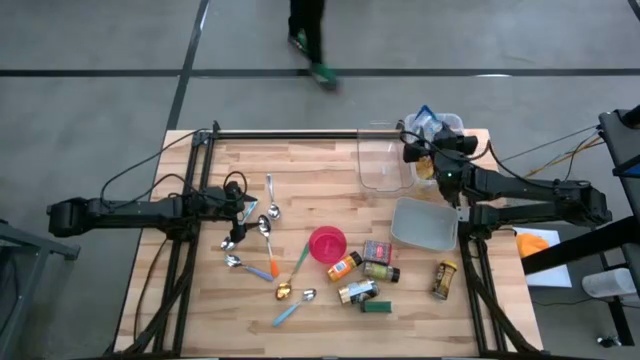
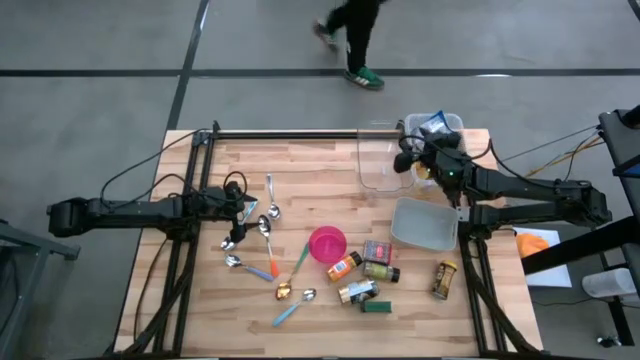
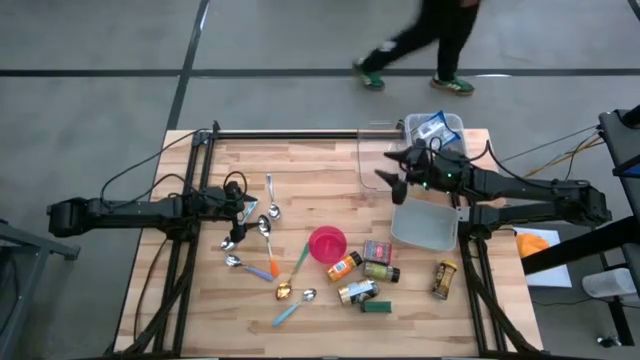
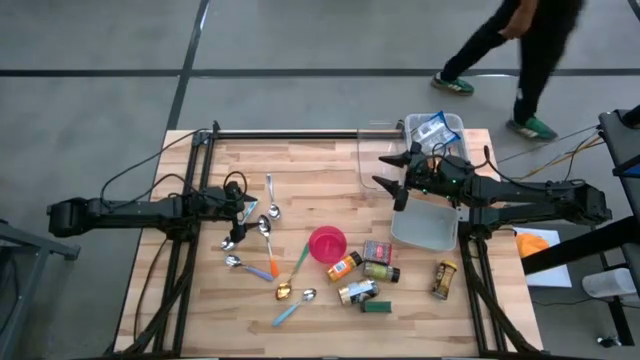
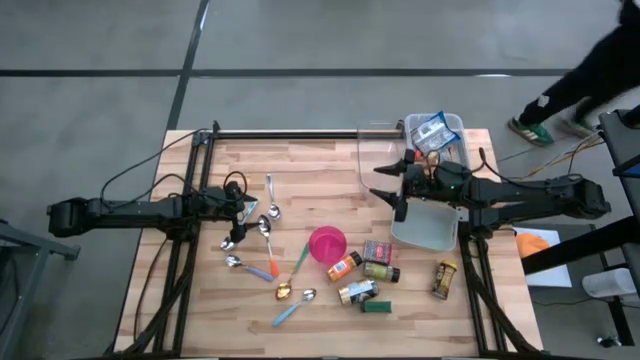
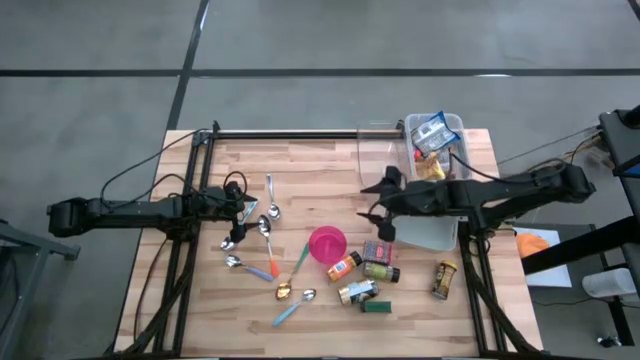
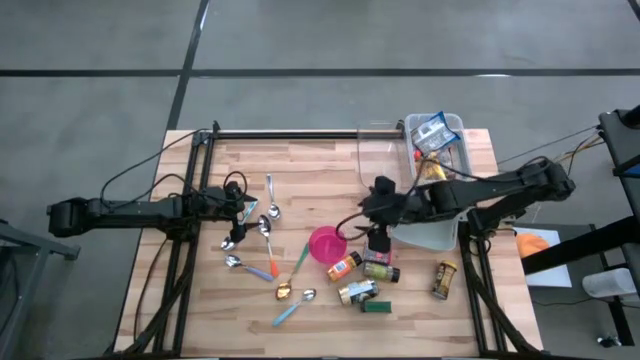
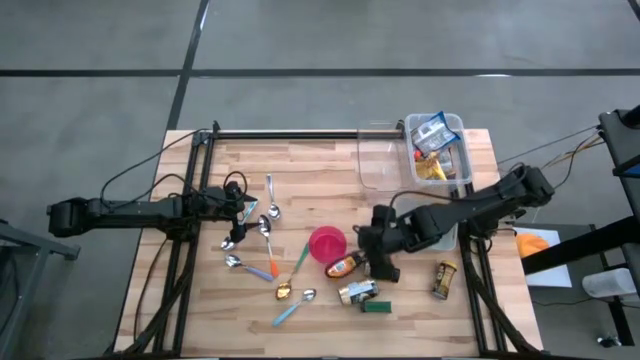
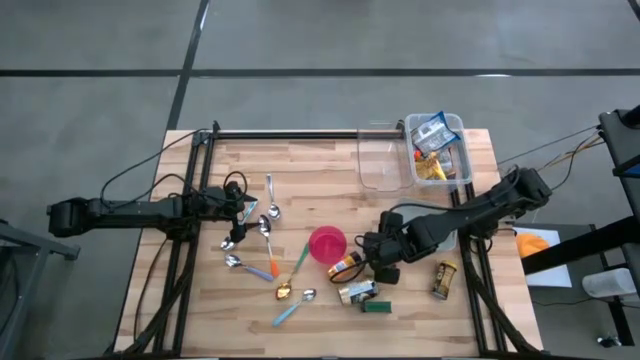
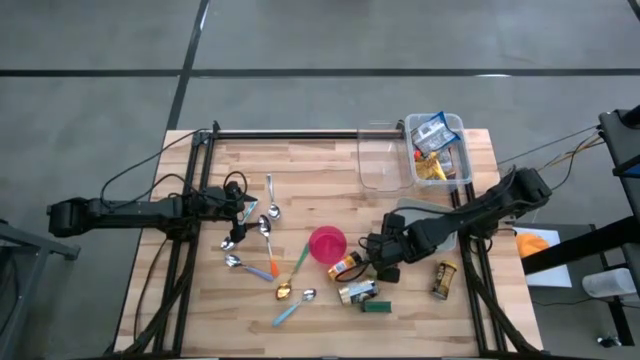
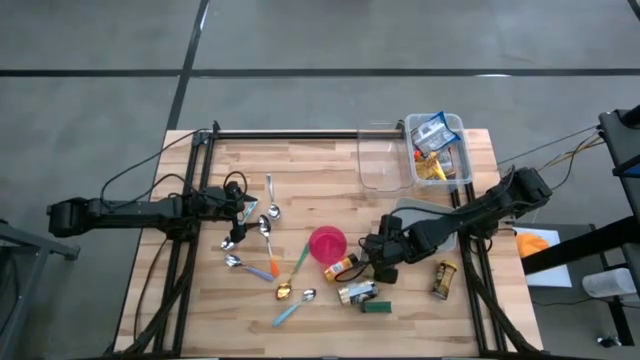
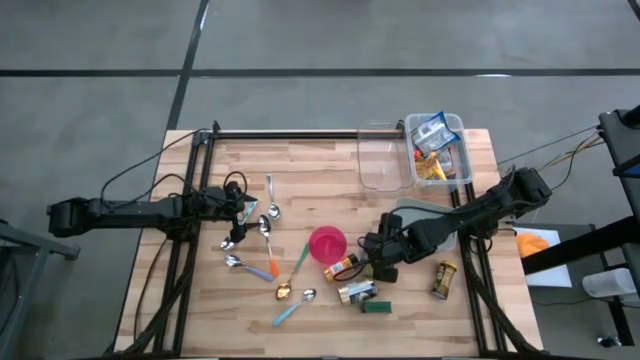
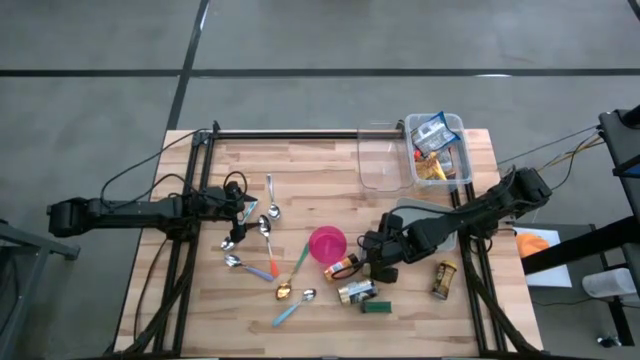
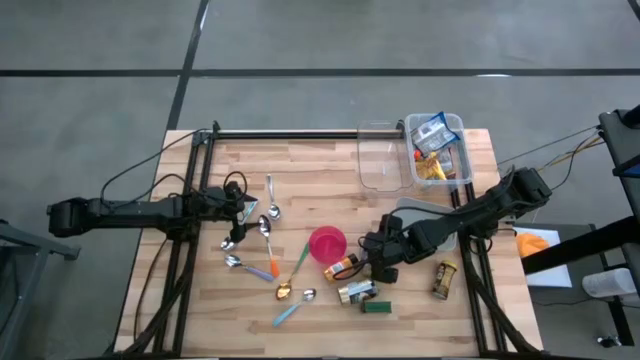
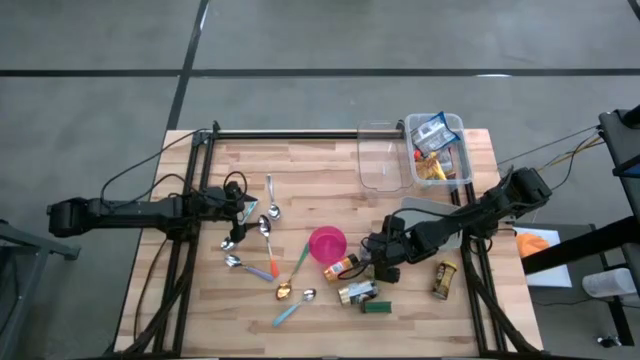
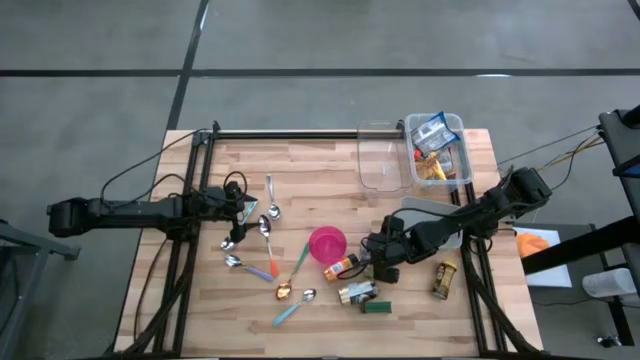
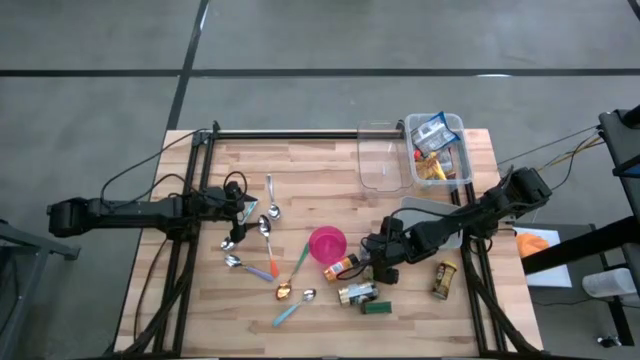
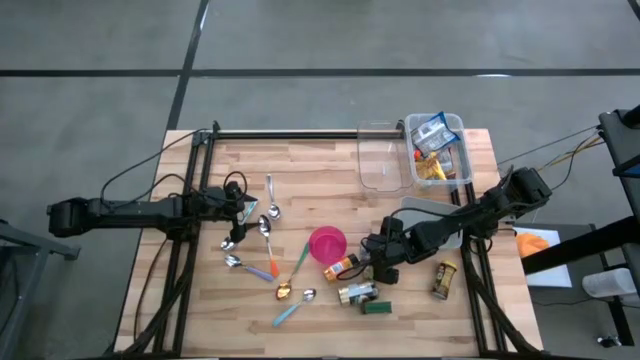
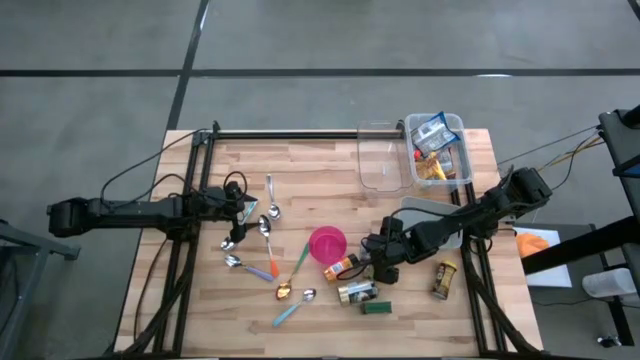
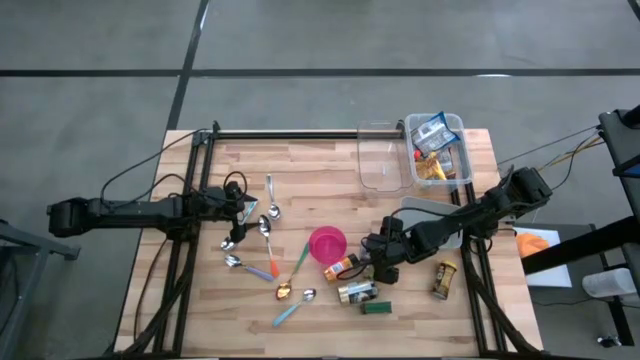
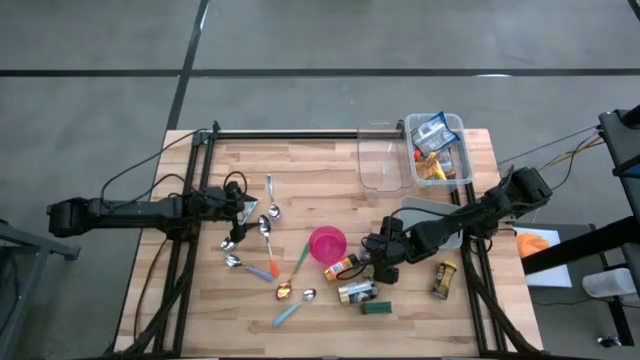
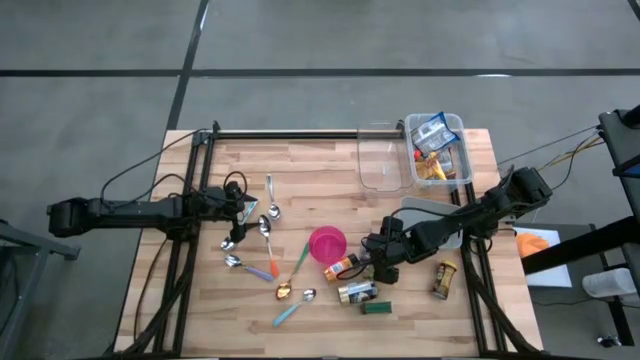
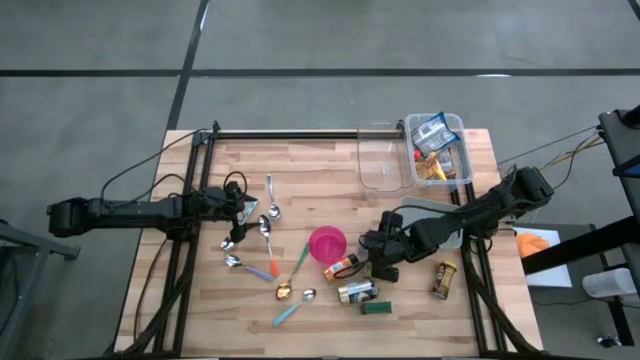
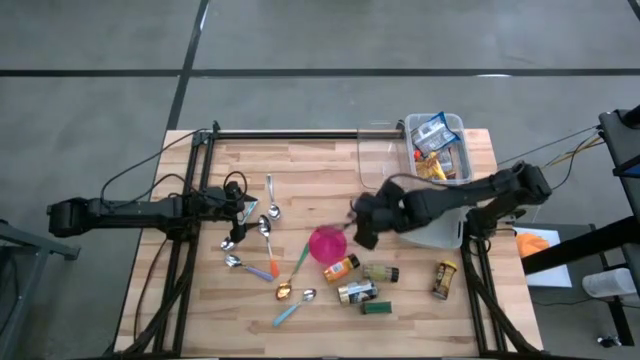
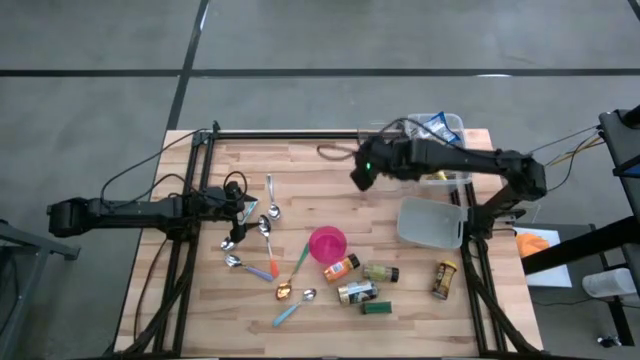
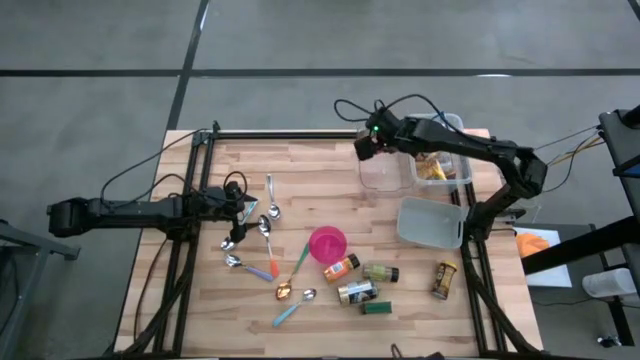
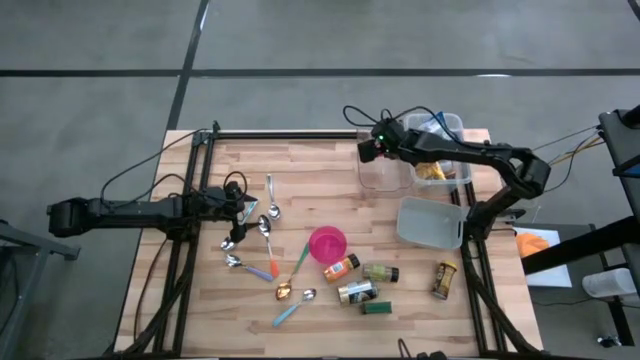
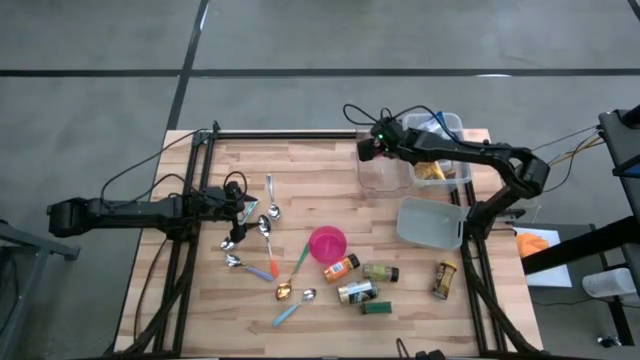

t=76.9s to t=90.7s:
Put the red seasoning can into the transparent bin

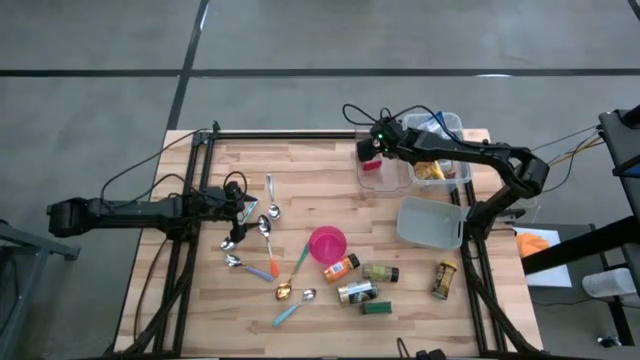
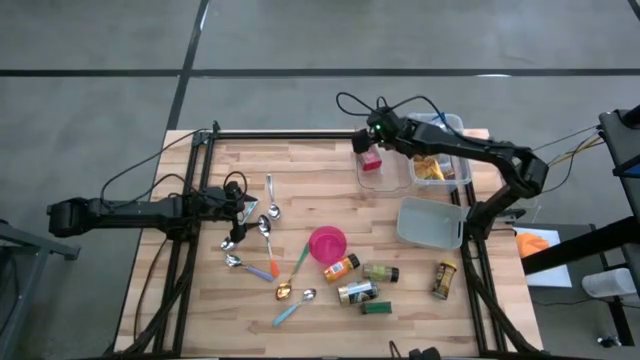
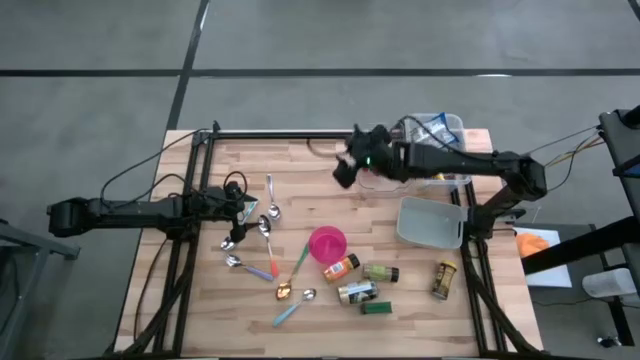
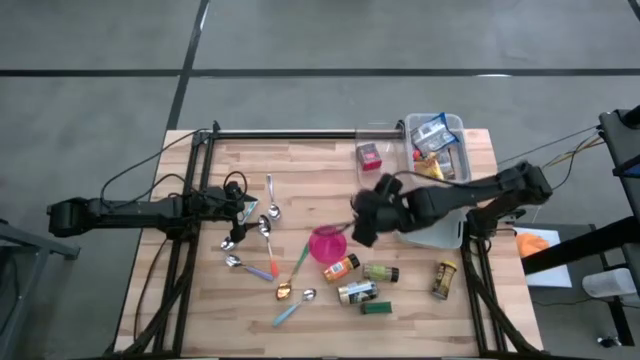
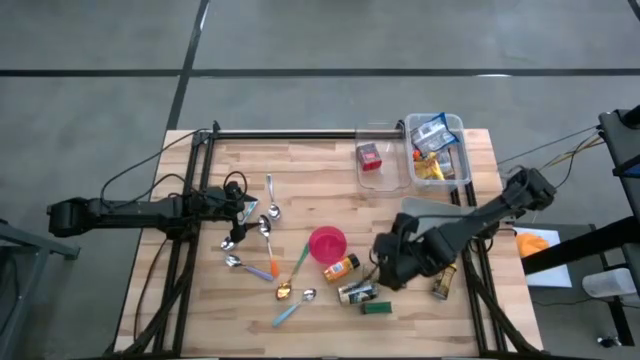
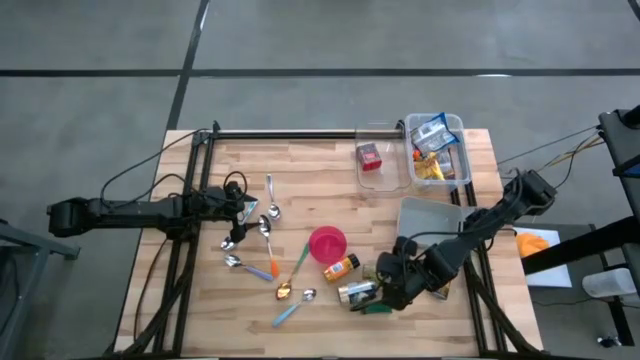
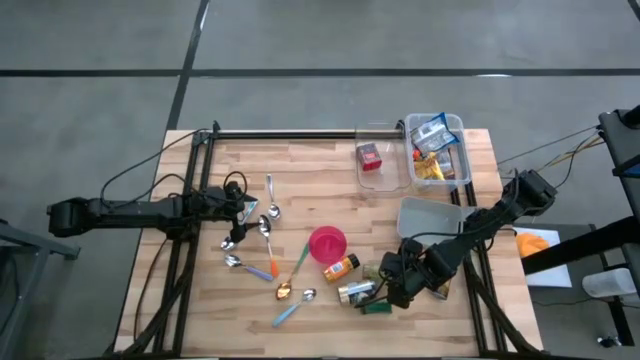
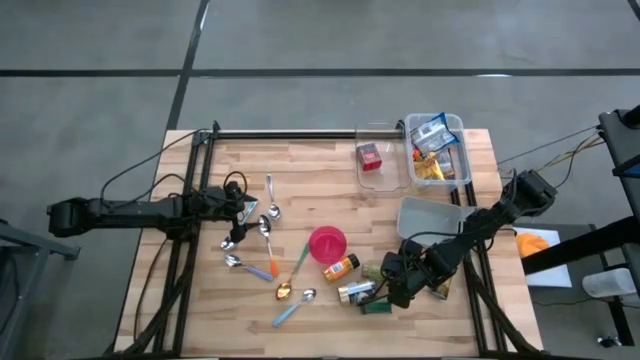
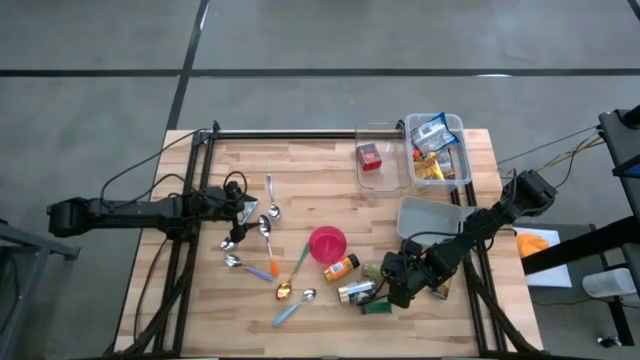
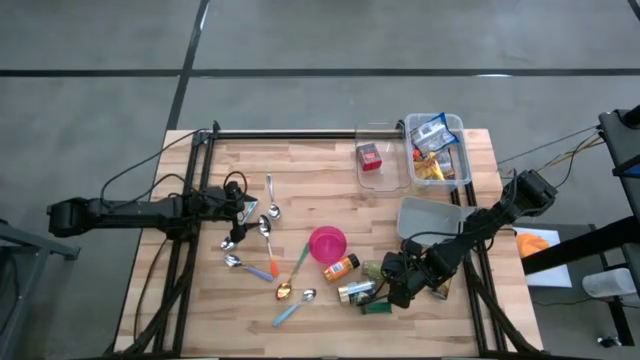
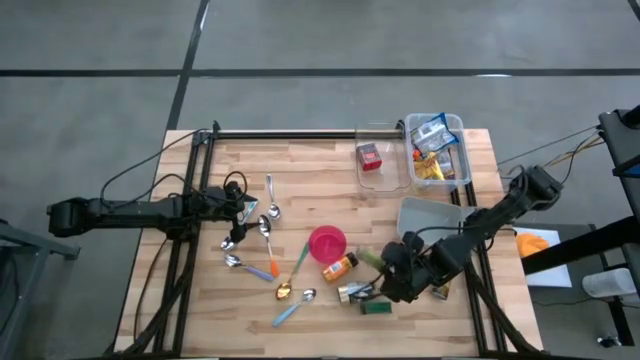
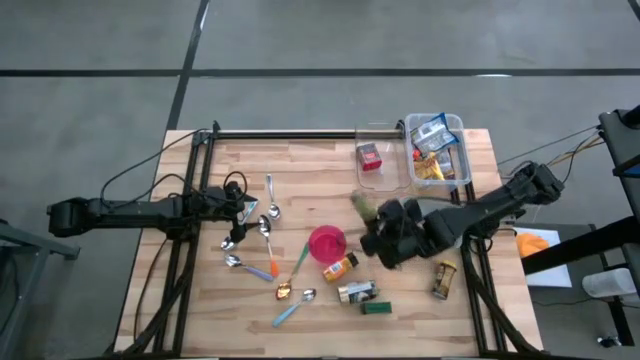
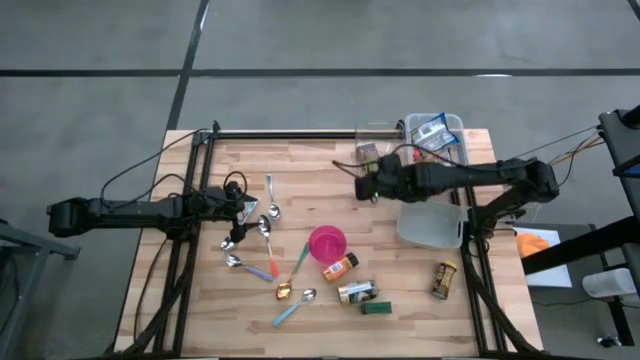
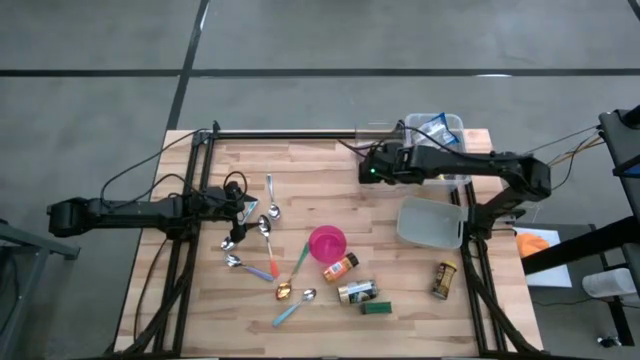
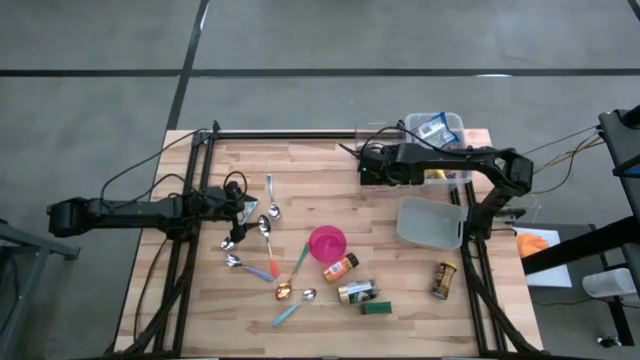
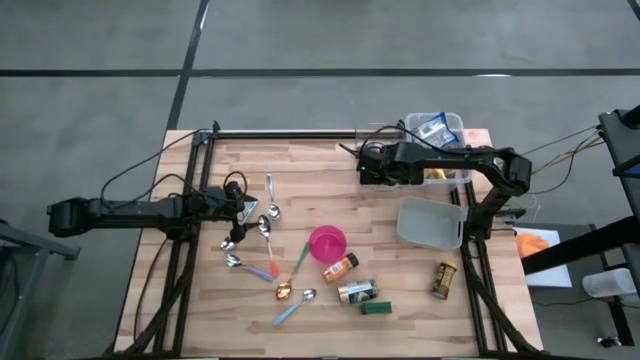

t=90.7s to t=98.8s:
Put the green seasoning bottle into the transparent bin
